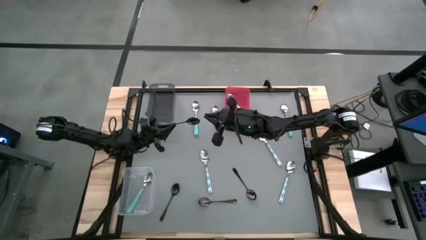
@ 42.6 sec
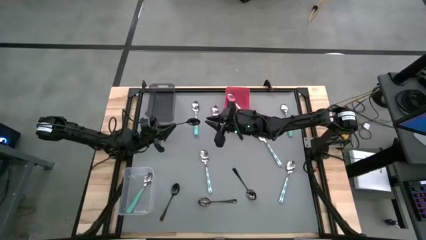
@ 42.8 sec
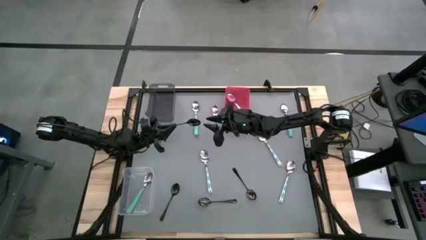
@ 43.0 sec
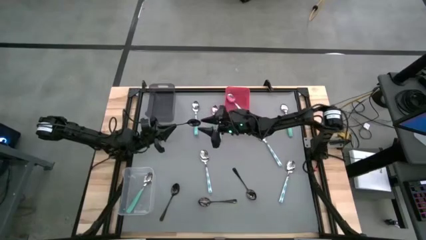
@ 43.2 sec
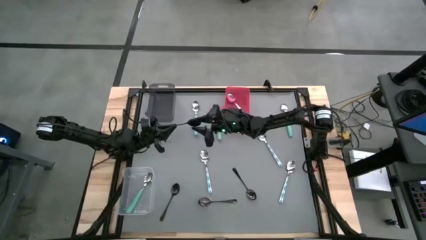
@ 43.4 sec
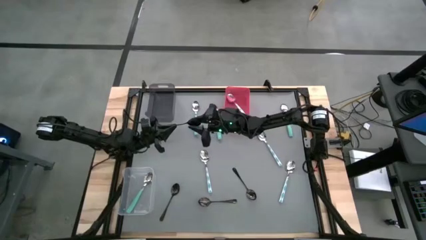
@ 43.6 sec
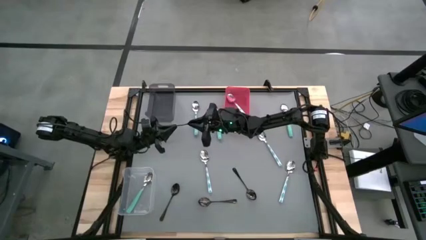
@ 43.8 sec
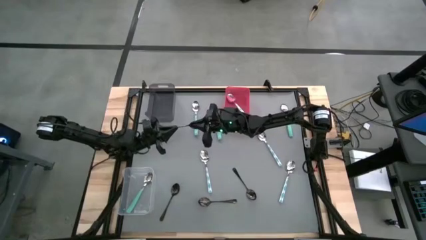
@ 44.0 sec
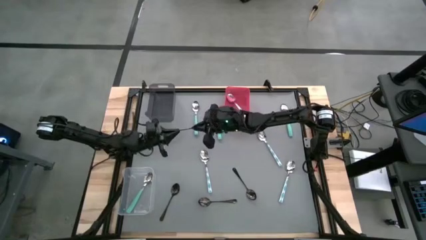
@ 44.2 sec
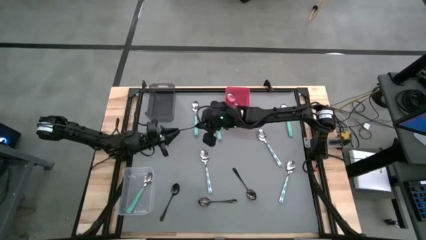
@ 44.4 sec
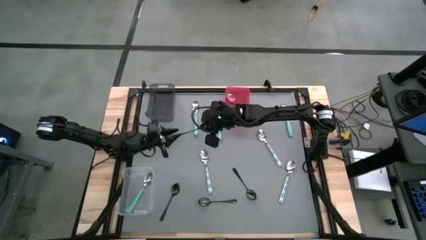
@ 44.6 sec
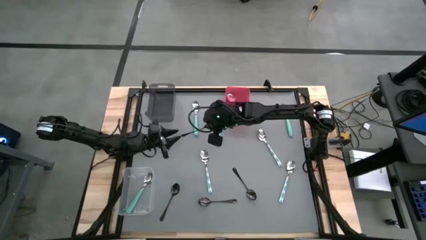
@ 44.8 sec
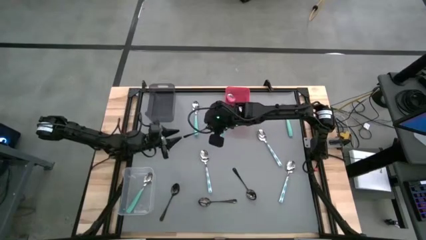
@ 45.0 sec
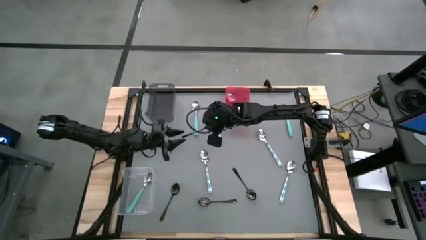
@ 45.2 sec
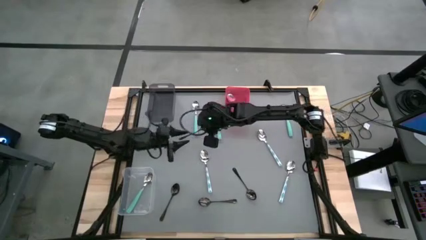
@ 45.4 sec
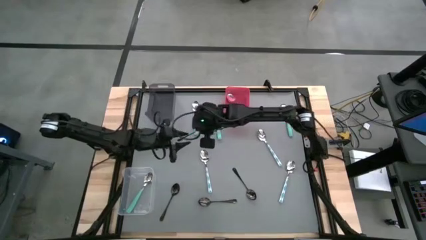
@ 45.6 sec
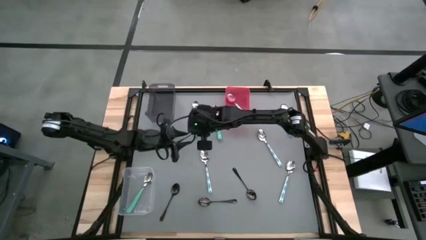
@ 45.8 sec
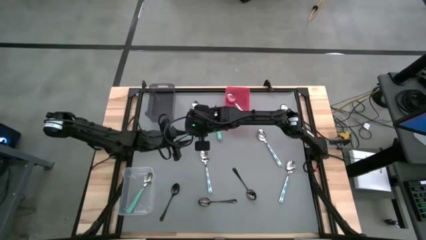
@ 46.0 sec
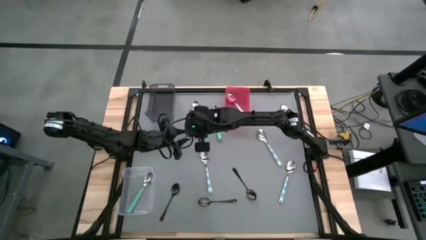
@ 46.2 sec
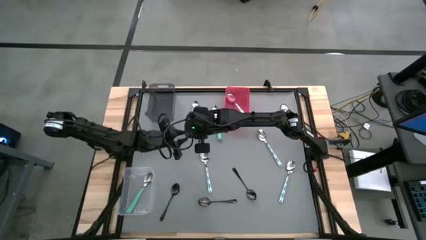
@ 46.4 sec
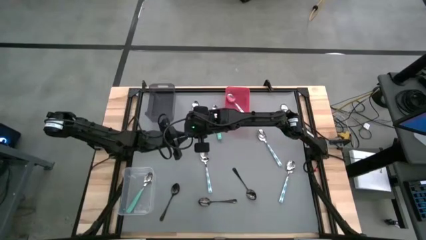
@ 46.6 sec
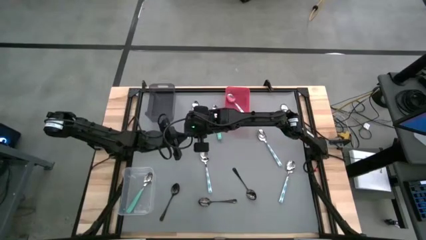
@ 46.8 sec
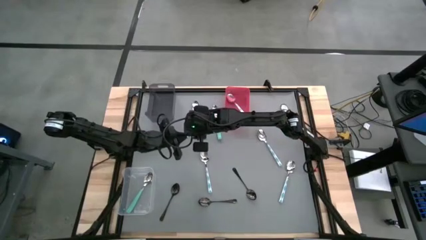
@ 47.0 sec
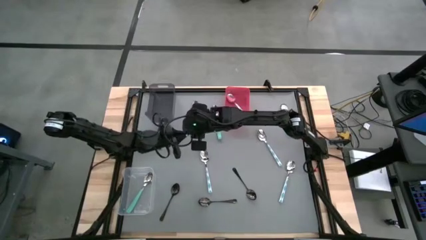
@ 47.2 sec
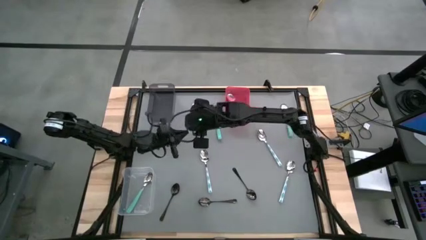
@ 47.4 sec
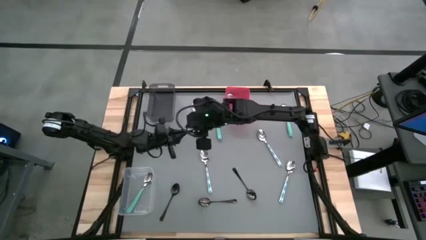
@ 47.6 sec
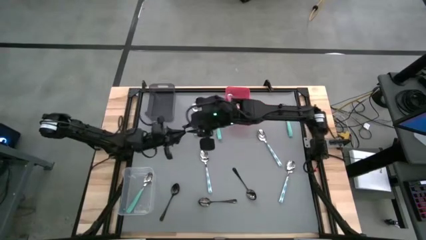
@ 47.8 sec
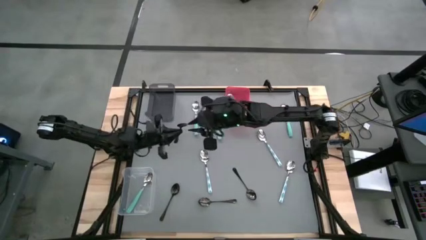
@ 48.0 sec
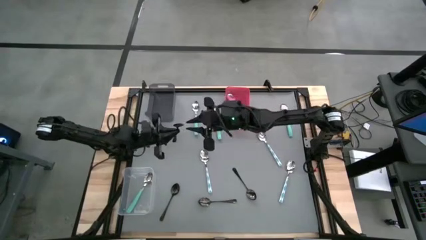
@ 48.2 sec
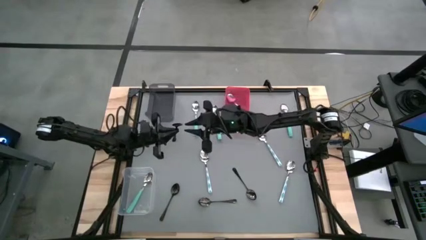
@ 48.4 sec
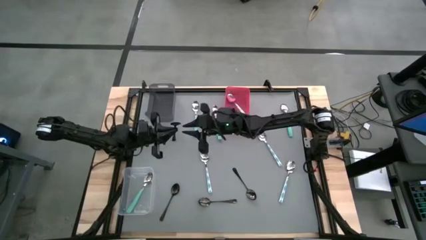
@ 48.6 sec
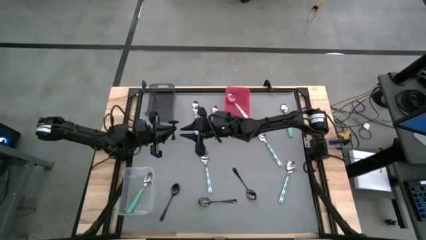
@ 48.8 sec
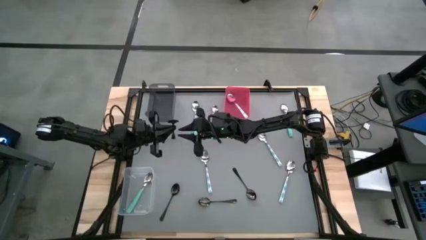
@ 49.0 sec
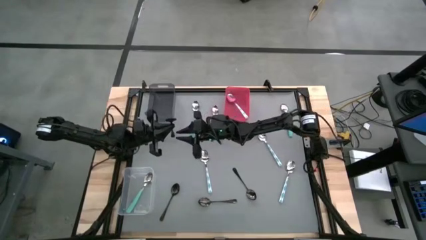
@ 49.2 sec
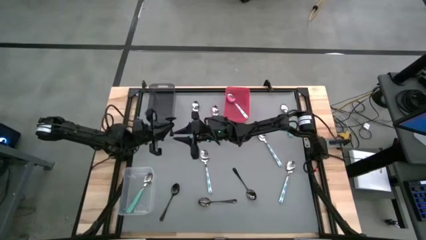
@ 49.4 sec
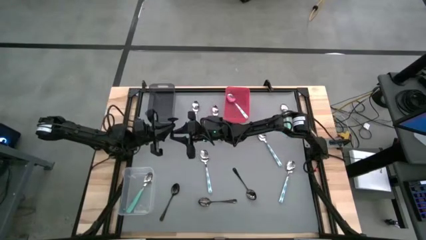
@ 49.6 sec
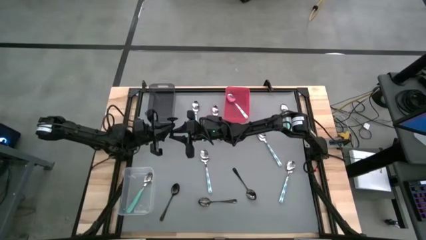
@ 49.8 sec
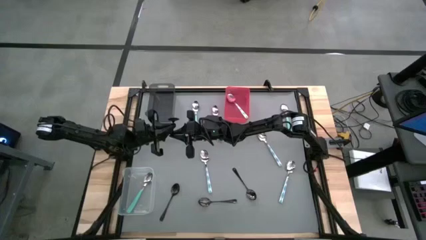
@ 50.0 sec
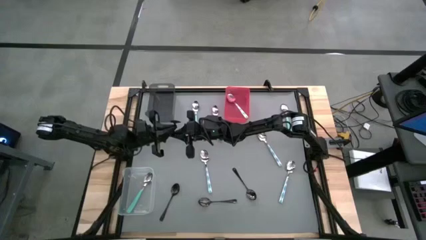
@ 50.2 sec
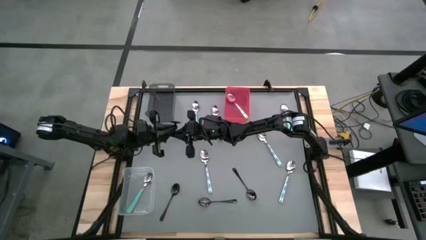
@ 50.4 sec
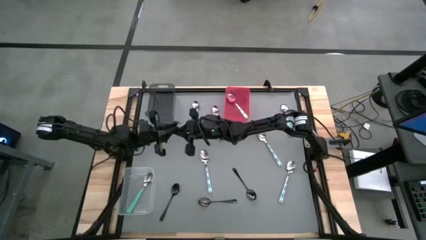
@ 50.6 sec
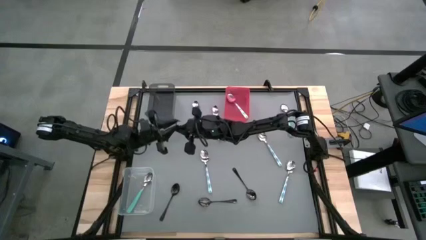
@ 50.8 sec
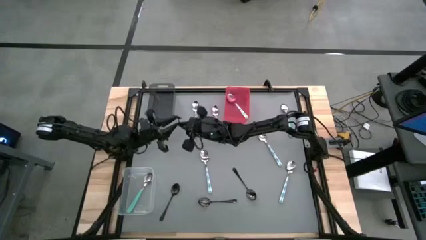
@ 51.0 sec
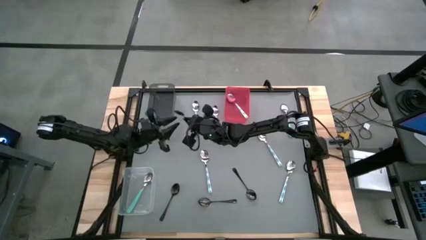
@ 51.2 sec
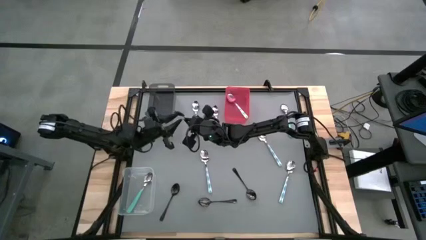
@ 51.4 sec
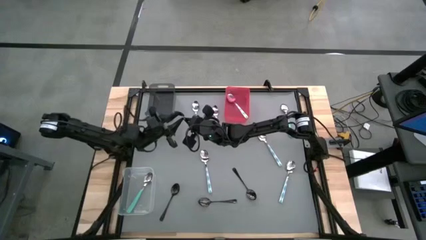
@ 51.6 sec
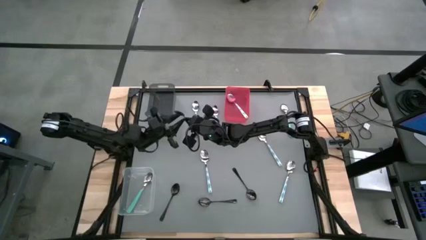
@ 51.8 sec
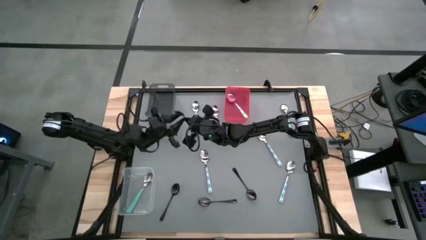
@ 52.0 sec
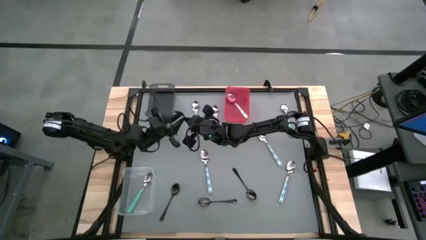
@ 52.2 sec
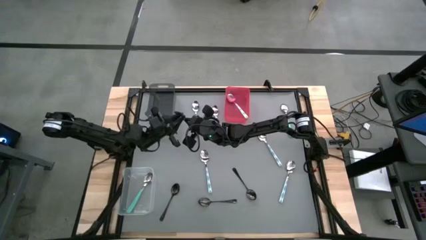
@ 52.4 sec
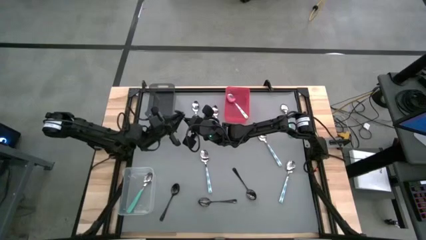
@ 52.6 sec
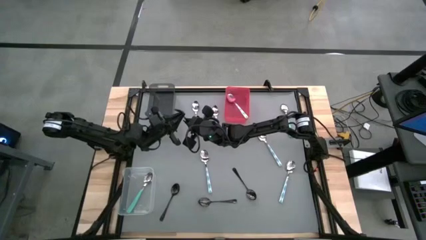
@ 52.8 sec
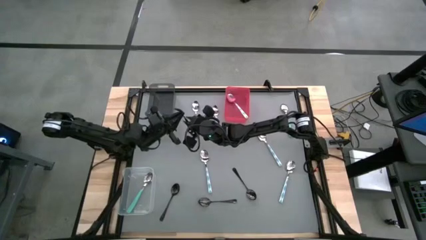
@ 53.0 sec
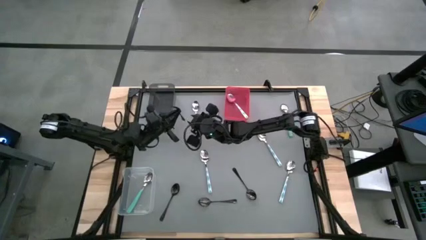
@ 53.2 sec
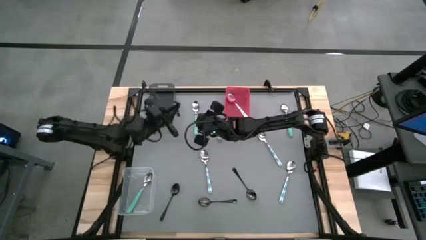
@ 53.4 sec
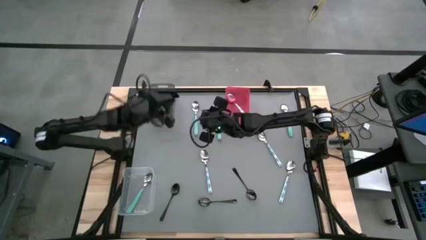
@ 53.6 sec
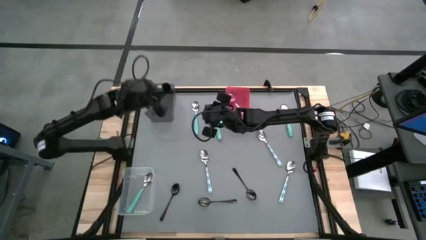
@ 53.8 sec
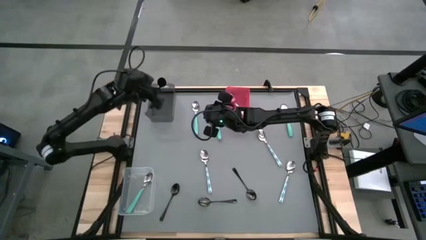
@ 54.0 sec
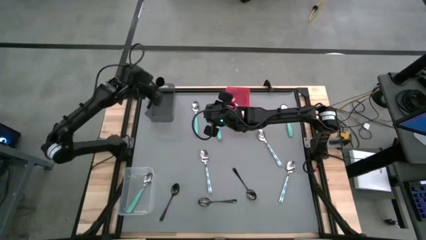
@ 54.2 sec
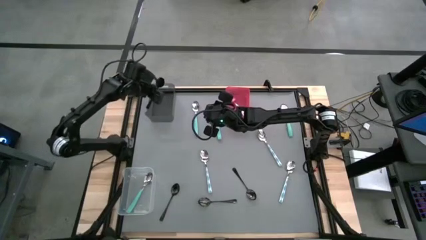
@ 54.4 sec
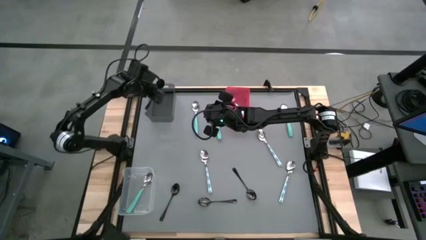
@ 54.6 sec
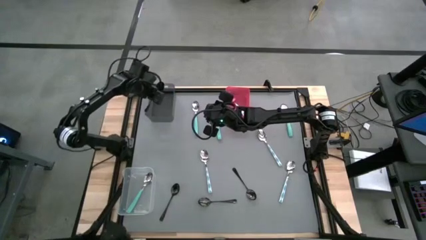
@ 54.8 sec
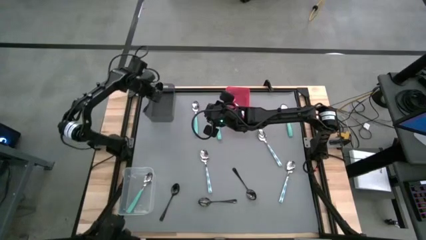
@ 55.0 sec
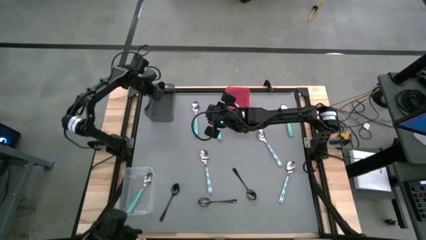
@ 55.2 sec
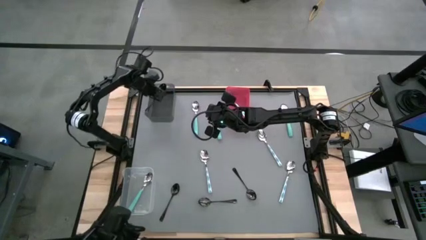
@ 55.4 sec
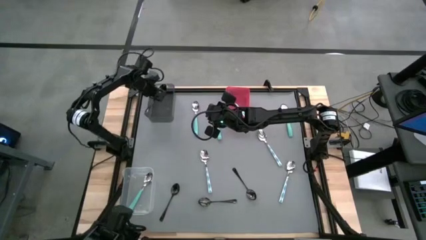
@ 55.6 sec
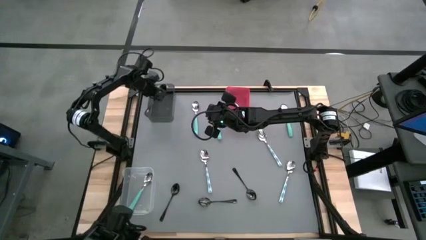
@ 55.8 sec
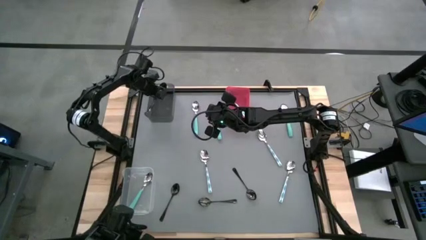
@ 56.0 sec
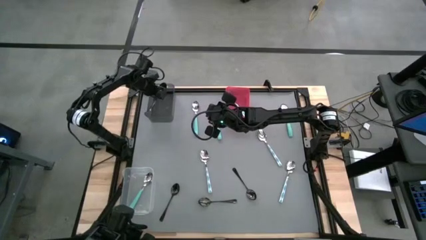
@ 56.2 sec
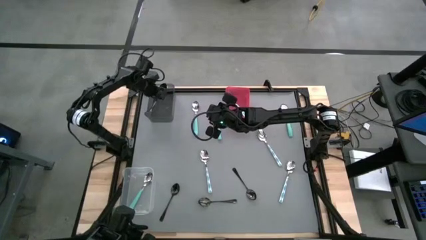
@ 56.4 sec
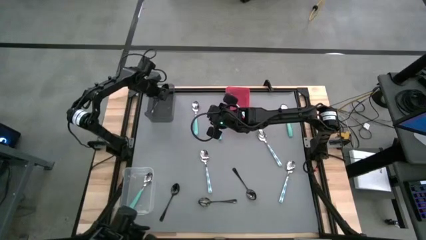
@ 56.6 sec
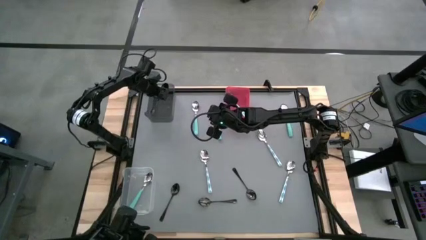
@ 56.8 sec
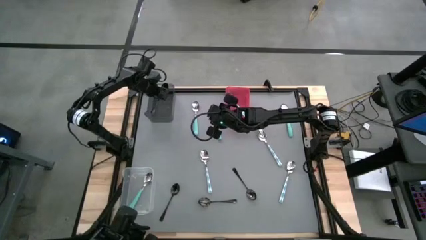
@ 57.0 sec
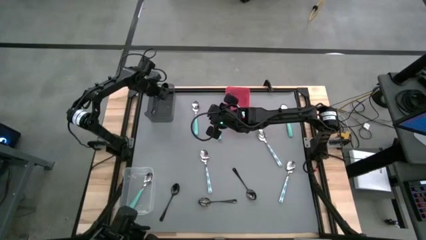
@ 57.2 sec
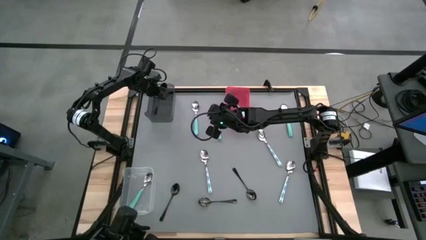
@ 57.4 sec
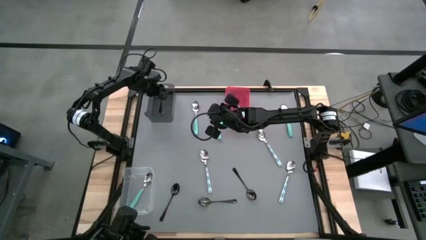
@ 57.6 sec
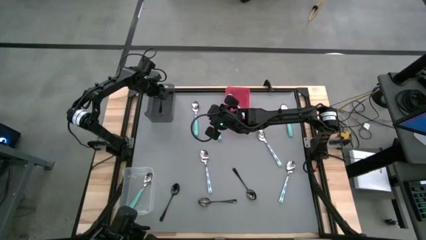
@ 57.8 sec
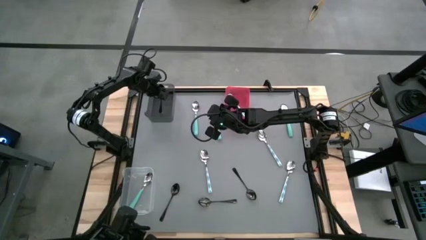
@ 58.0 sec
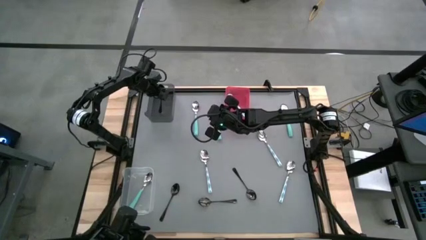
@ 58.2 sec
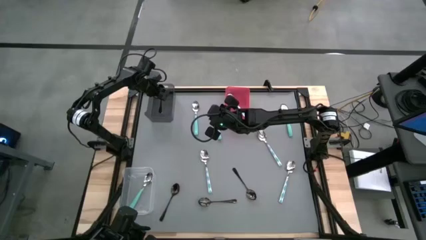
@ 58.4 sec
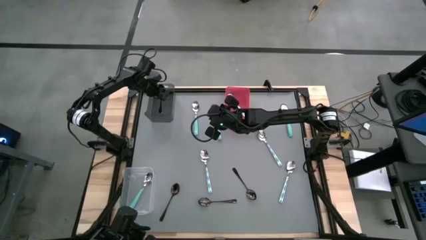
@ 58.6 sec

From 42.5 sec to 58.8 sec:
Task: Sort silverware by color (type)
Put the black spoon into the black bin

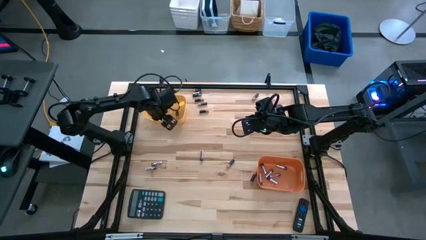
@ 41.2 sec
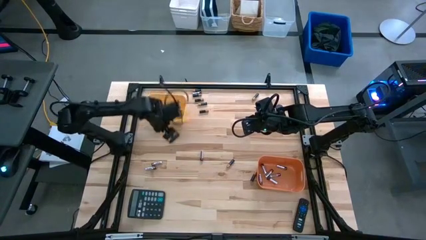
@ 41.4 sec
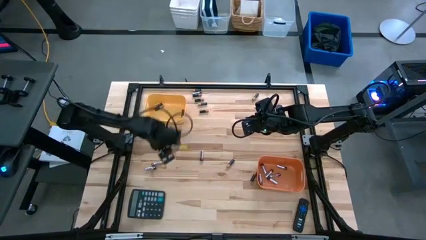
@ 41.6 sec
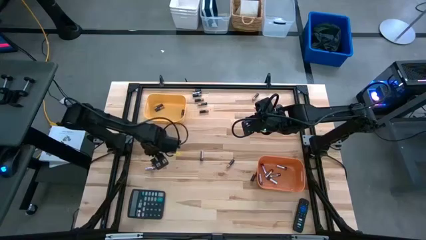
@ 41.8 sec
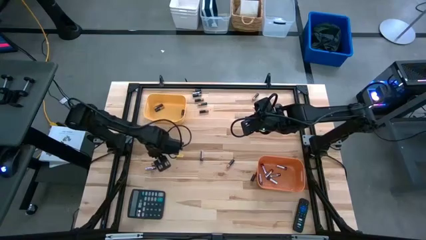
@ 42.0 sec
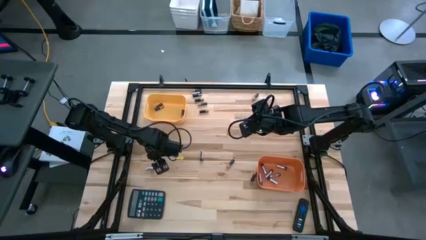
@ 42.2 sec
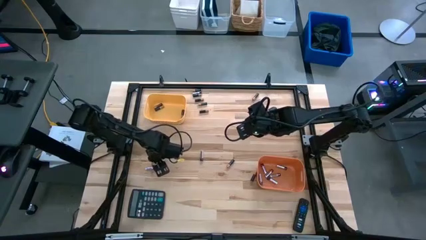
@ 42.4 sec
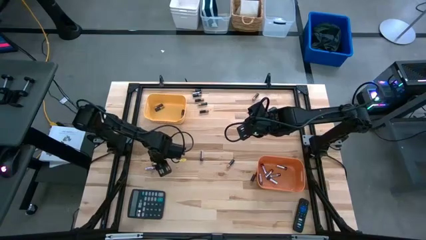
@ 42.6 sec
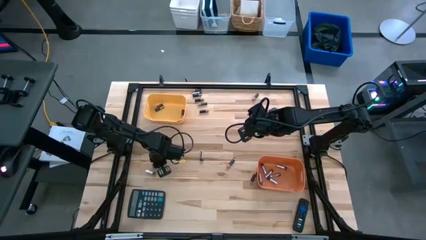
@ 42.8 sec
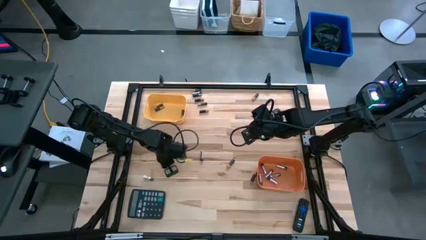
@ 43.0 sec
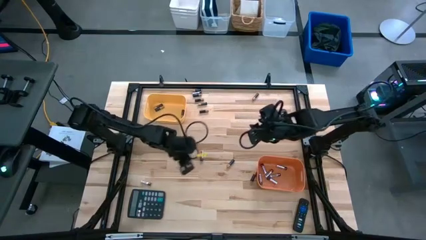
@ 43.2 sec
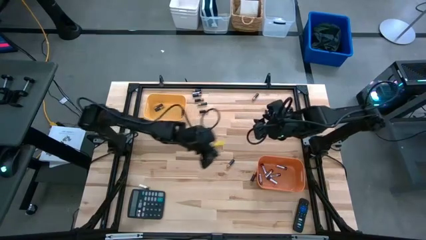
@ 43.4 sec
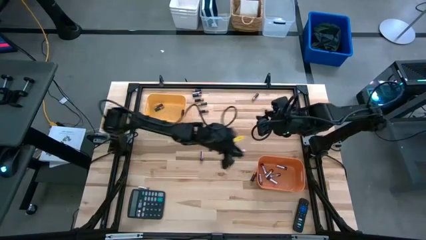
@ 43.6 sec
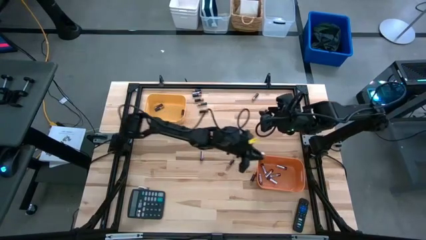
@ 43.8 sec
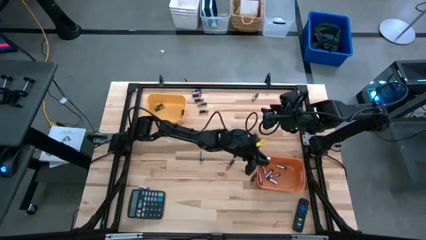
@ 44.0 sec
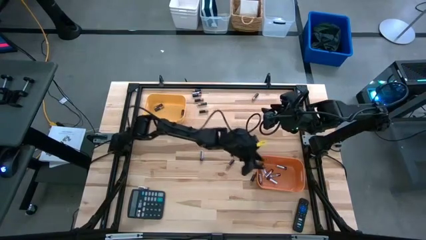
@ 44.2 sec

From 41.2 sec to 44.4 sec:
Task: Sort batteries
Put the silver battery into the orange bin
